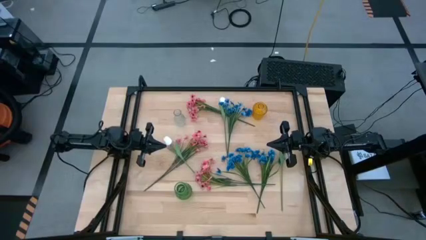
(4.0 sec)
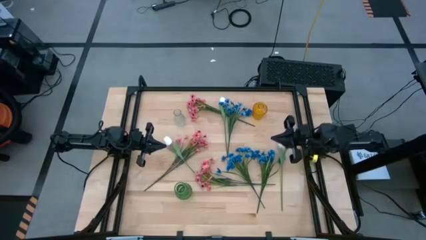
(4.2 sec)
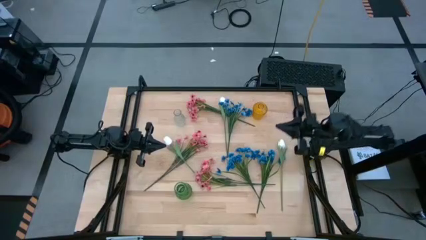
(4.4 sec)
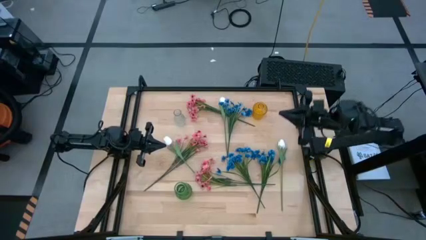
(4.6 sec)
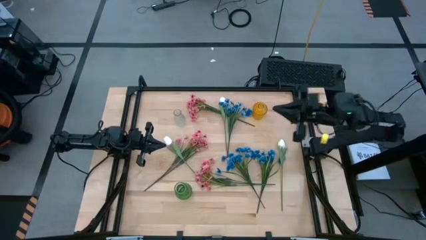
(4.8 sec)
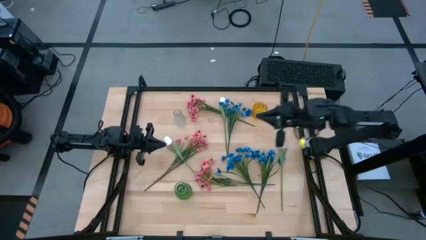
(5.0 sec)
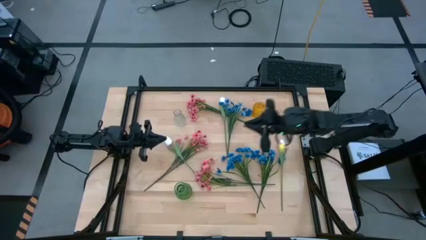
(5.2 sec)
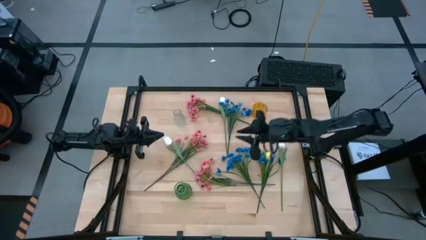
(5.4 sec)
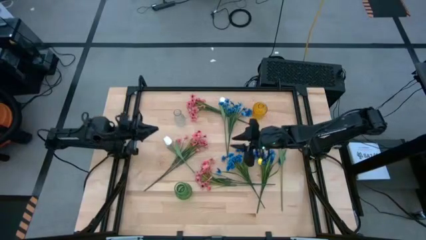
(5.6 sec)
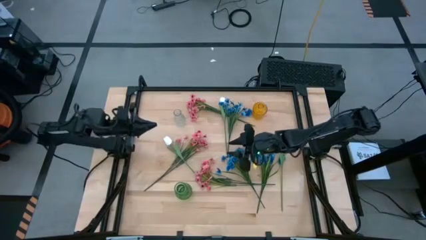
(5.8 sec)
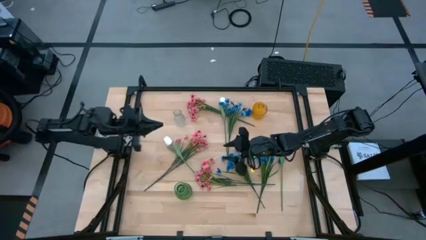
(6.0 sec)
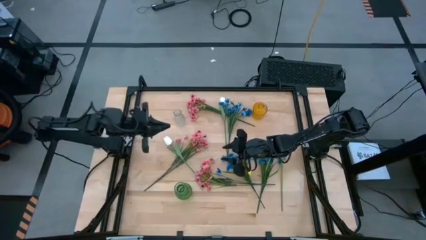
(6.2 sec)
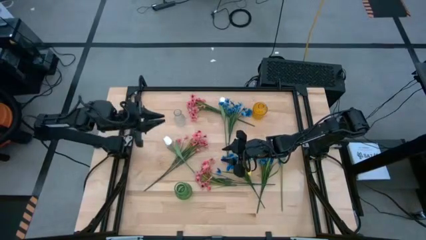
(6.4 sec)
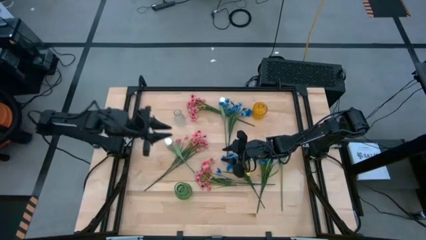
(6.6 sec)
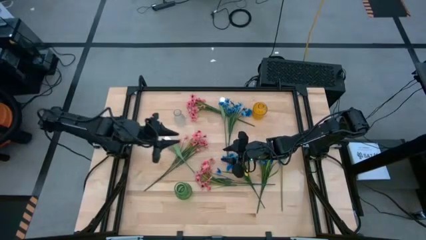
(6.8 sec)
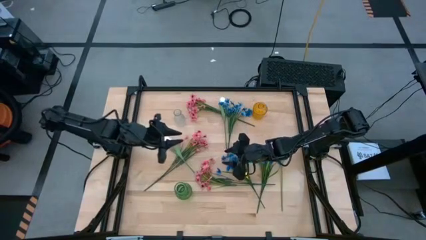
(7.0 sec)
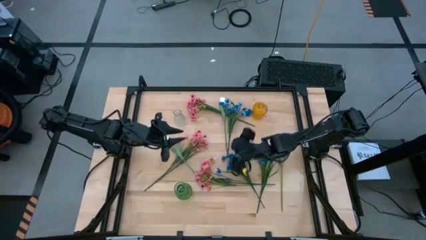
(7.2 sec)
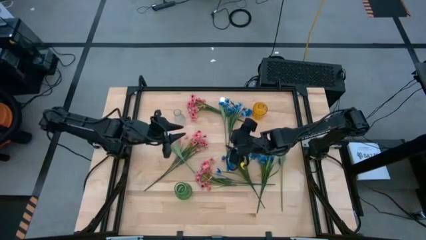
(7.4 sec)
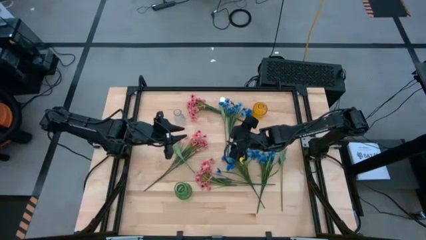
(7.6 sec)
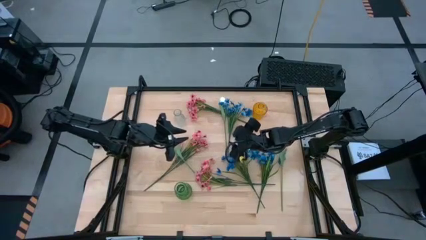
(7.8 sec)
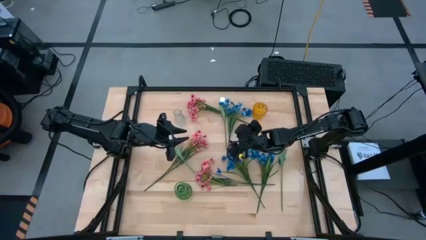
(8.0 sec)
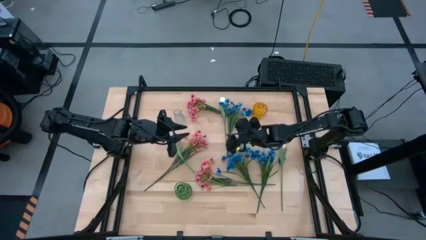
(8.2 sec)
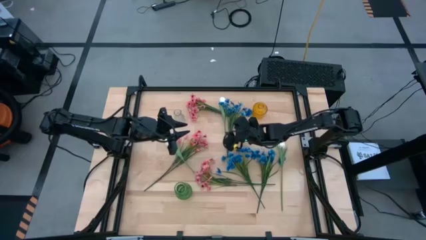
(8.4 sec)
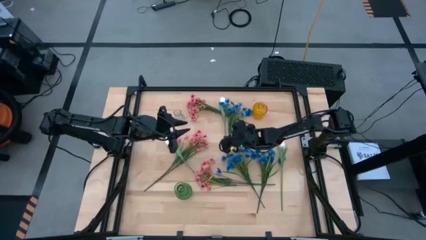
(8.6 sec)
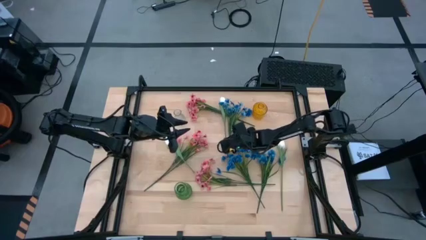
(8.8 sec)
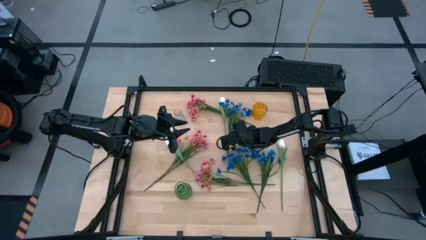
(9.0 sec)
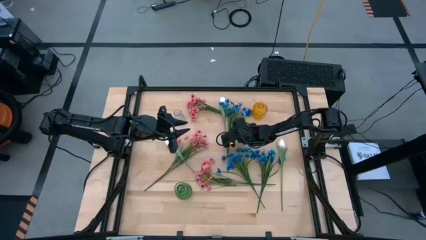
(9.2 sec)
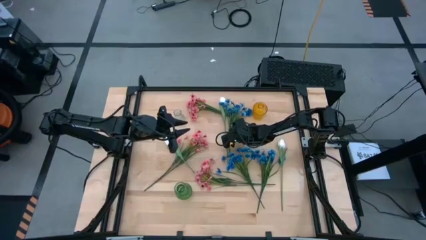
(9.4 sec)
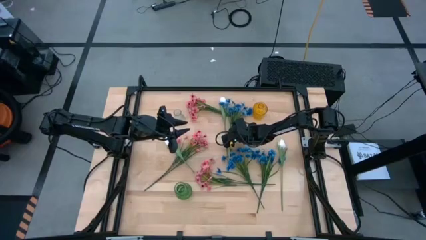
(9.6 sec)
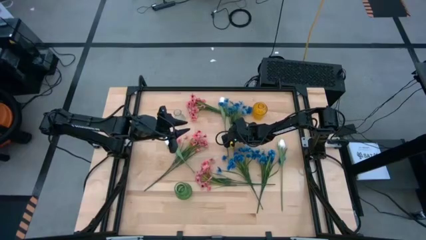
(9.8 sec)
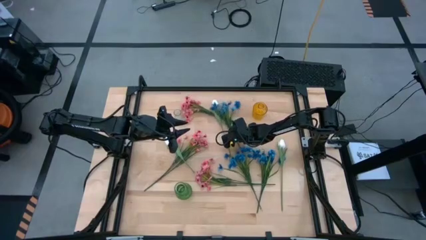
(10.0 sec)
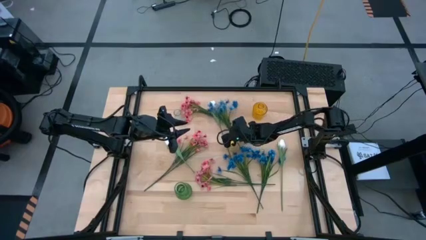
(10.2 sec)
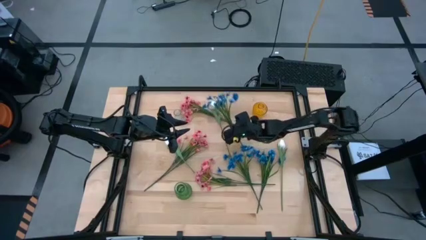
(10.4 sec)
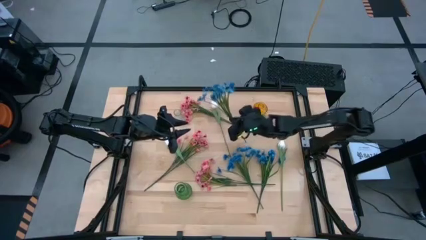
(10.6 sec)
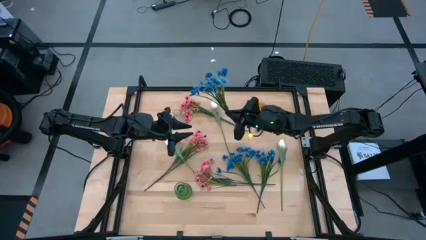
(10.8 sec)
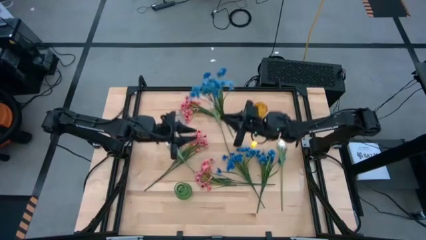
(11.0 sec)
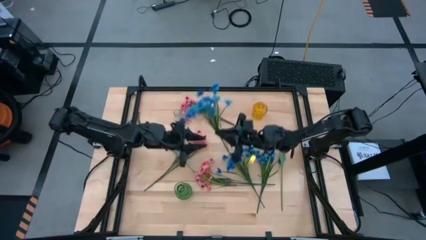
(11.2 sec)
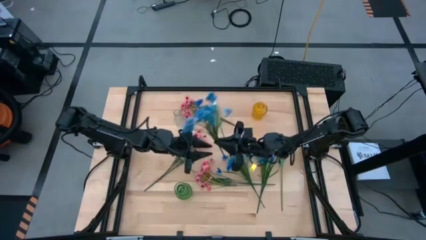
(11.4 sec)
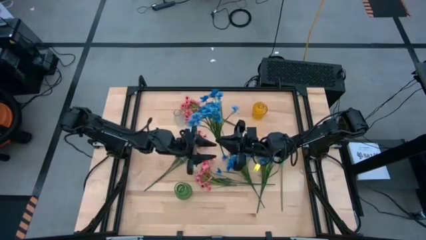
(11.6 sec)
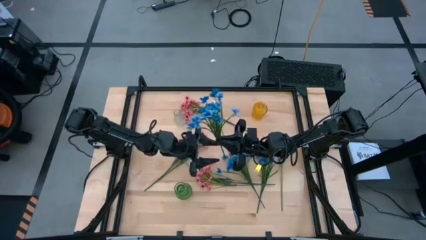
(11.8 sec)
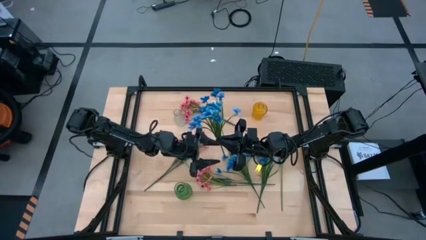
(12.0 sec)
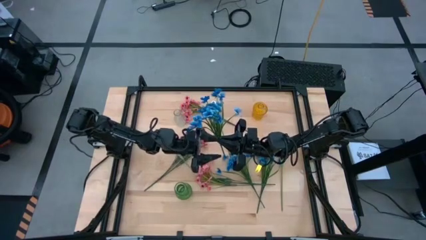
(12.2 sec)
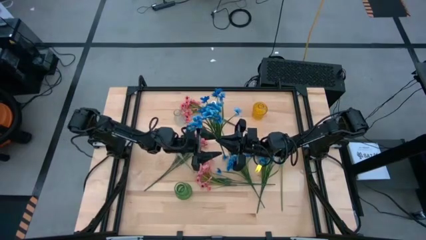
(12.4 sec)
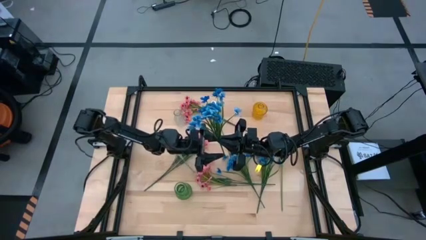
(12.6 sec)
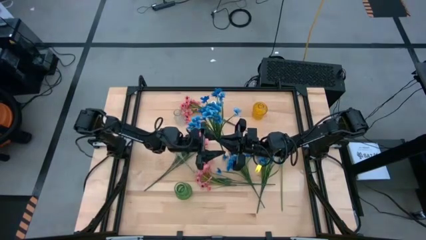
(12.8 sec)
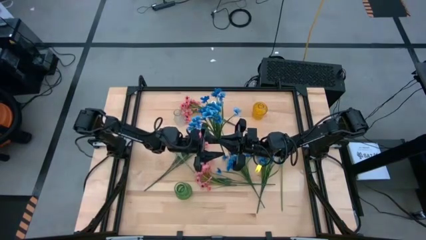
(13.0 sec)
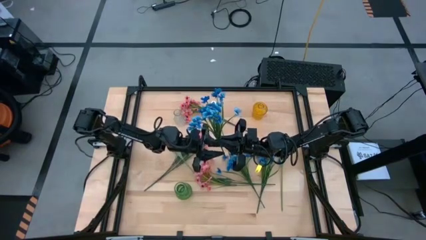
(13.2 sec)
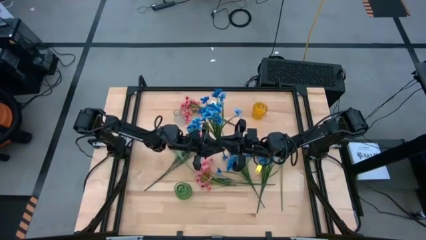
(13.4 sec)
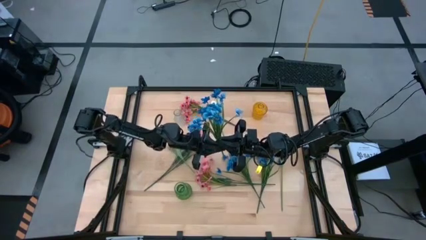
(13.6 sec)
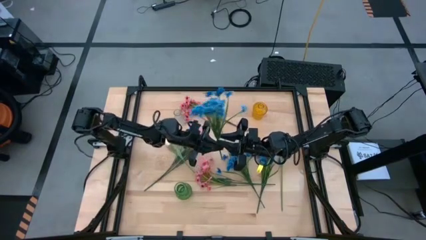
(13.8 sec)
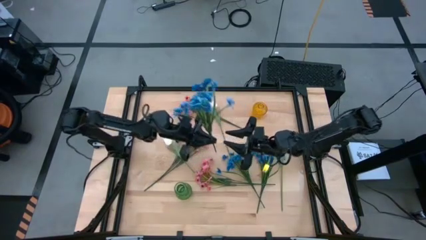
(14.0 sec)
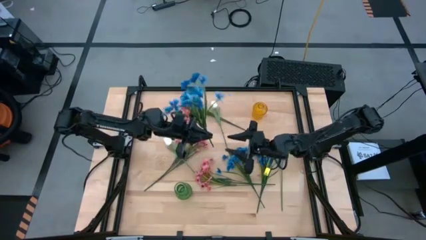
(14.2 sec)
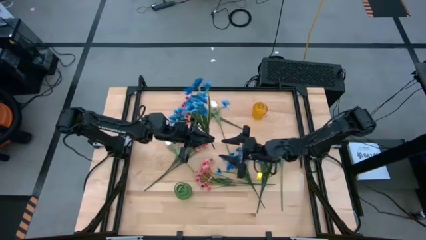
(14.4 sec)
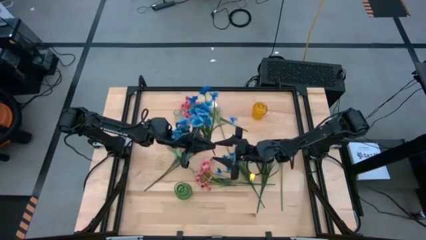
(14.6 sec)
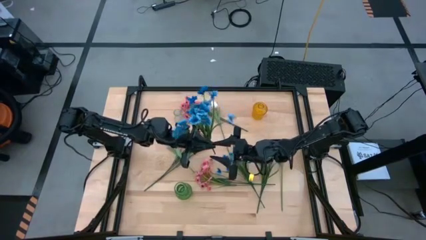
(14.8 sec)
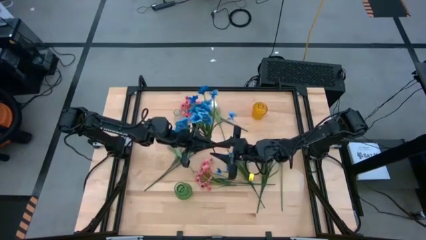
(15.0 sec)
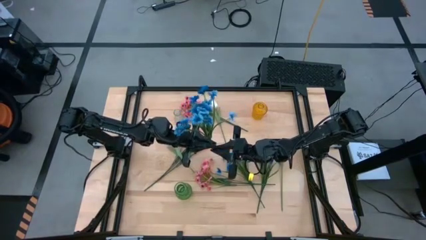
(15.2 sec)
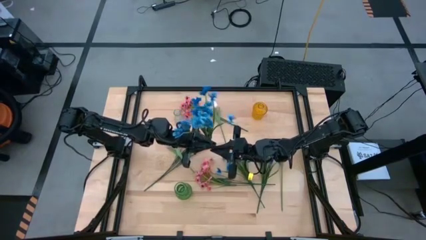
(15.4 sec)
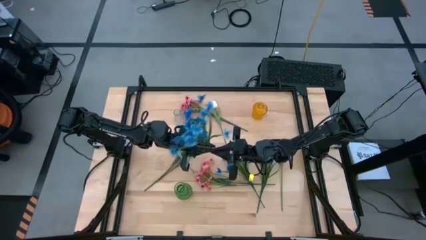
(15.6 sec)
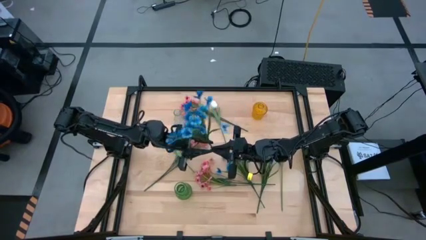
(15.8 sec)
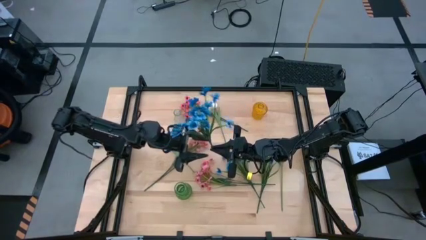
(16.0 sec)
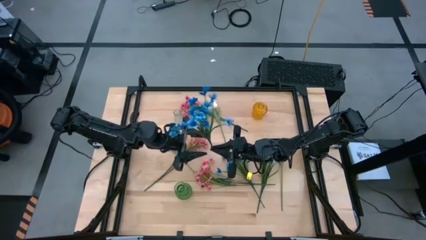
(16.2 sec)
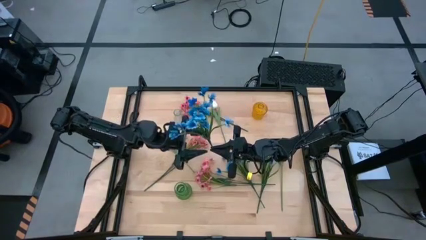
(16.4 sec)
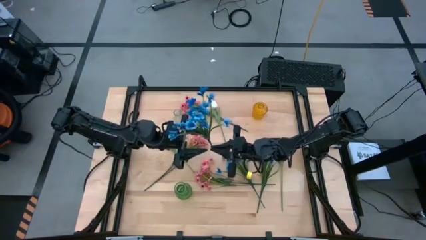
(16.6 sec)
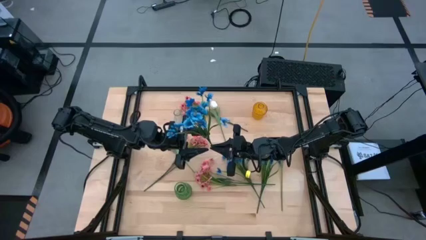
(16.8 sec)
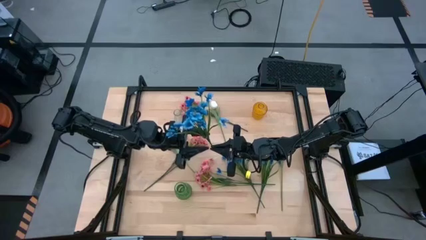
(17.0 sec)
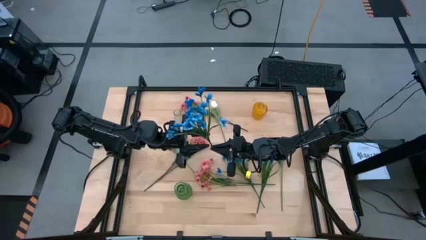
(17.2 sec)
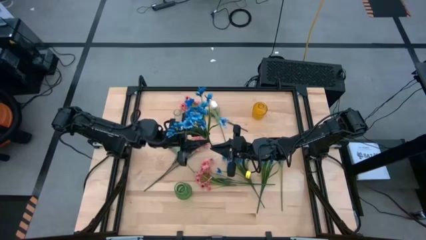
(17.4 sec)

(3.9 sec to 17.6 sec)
Task: Sort flowers into vase by color
Put the top left blue flowers into the yellow vase
